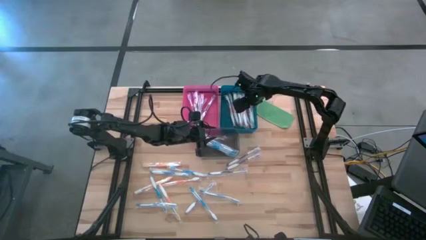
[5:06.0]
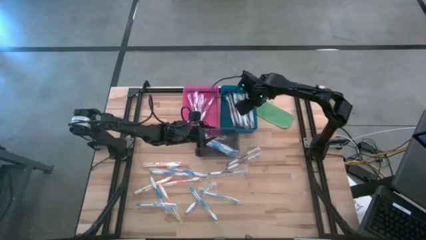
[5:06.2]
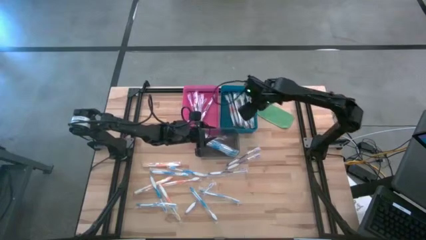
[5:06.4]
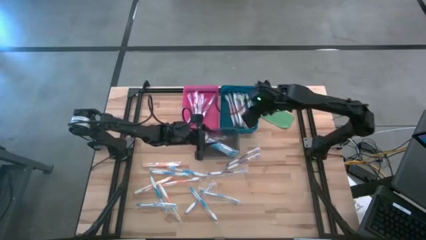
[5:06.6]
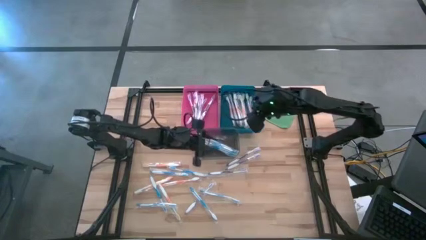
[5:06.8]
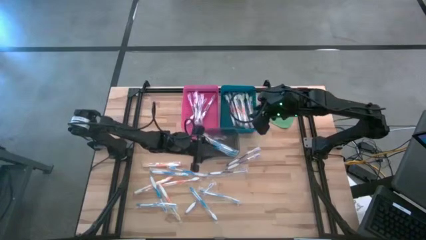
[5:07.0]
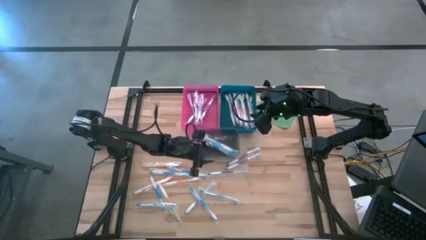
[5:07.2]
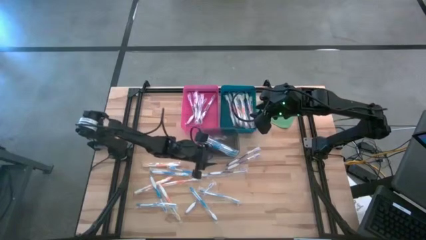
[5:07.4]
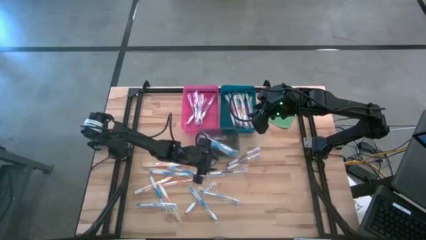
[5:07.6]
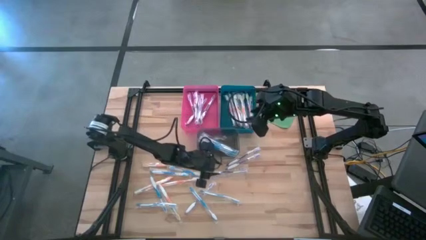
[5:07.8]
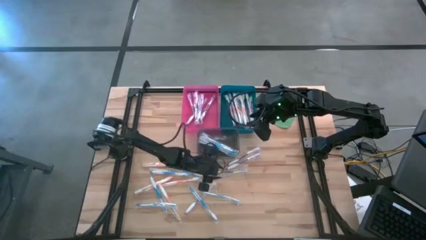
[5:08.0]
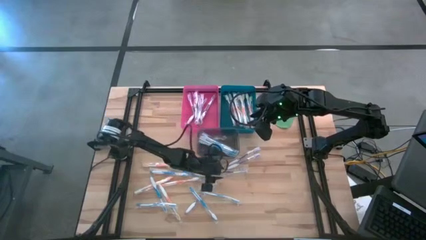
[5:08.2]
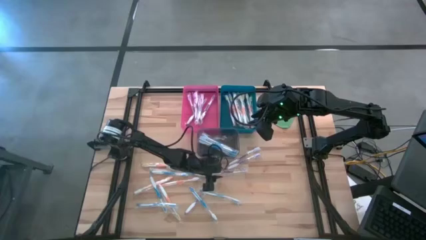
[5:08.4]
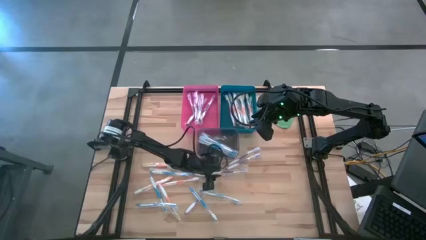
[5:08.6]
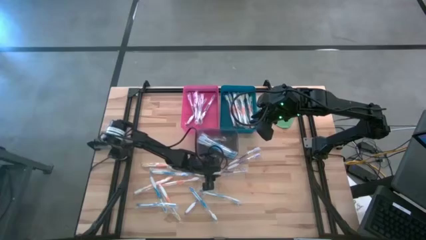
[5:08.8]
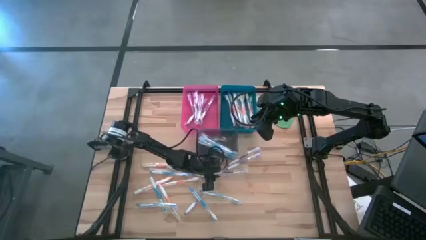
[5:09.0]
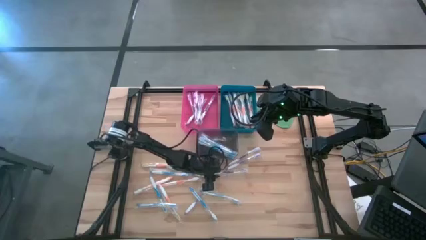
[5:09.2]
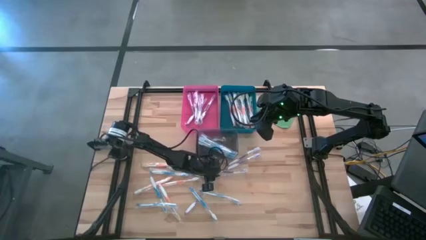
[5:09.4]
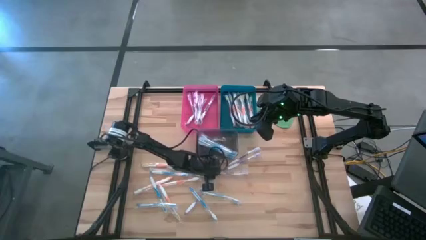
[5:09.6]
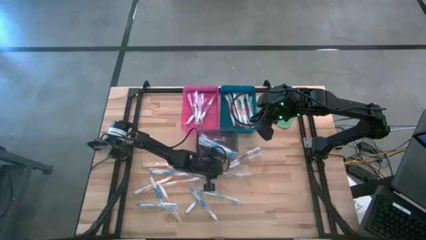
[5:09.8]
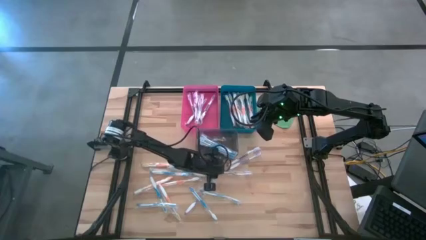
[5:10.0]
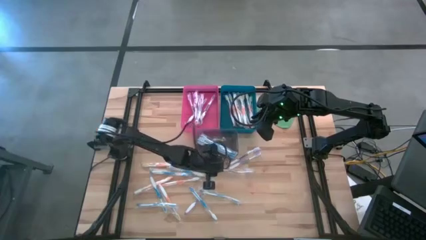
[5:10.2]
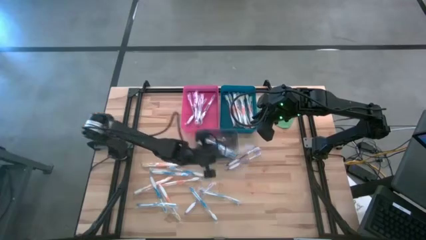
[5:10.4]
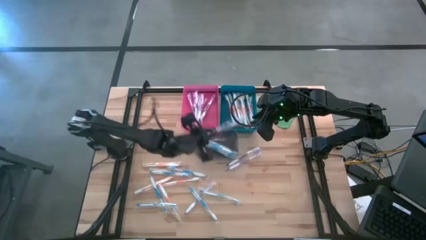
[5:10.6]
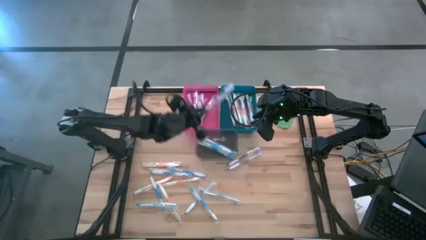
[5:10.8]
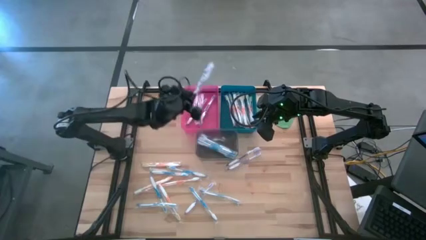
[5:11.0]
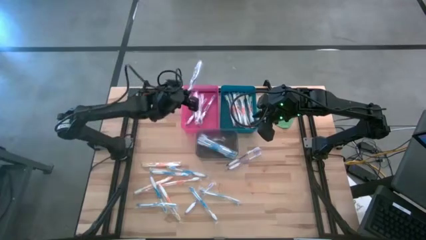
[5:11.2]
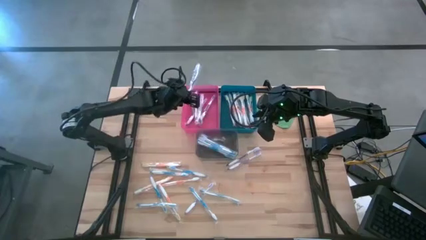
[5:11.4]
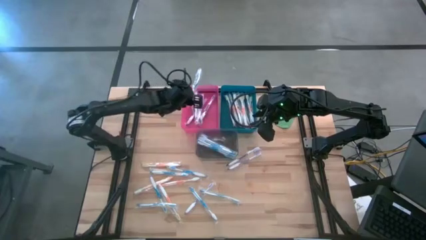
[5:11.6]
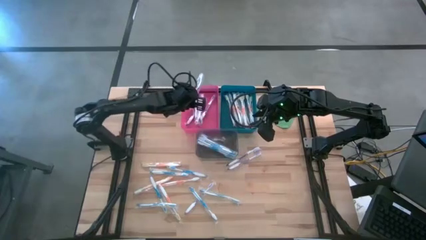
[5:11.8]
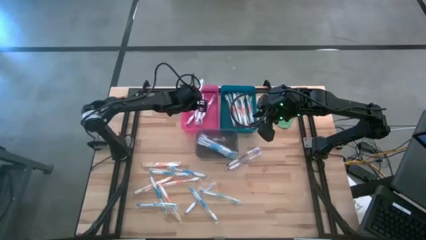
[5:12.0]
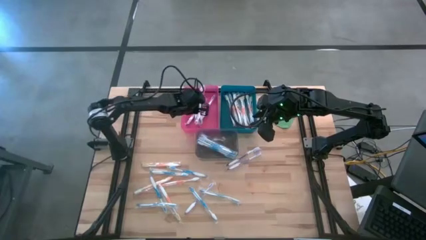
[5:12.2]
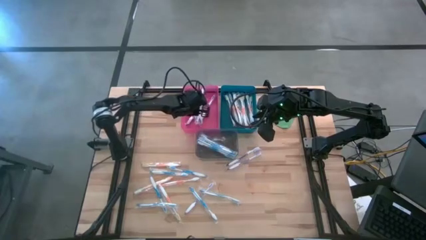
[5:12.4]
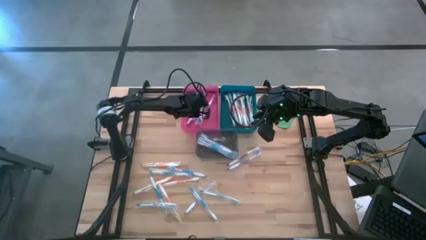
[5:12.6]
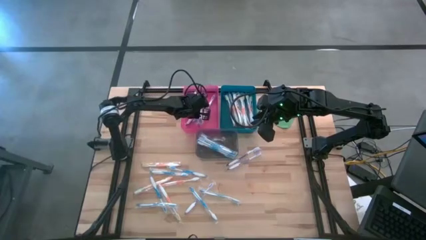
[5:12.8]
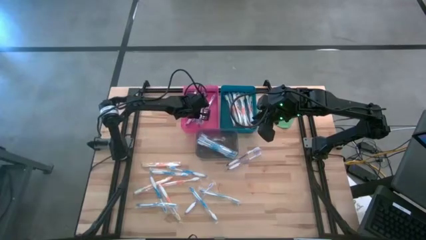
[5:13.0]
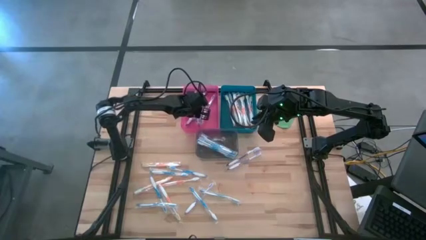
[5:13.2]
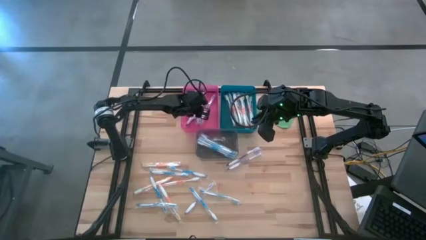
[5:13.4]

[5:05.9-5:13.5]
Task: Pick & Place Toothbrushes
Put the purple toothbrush into the pink bin

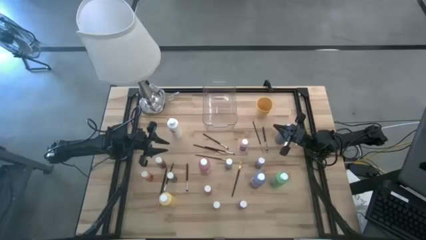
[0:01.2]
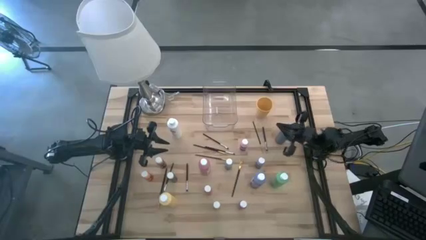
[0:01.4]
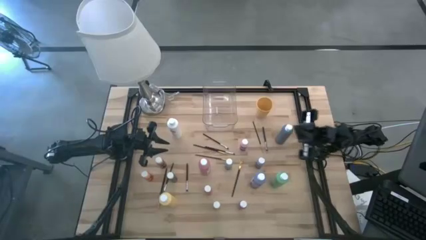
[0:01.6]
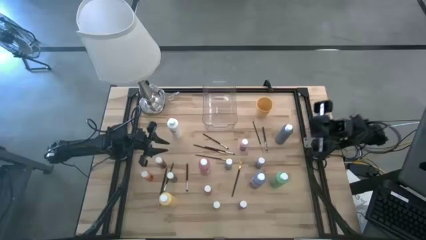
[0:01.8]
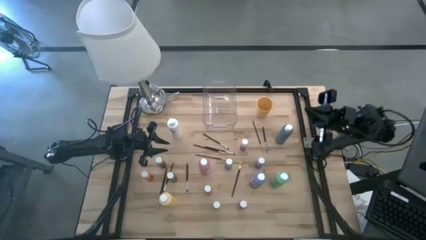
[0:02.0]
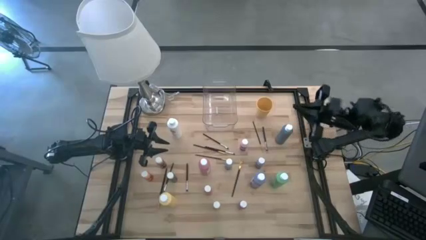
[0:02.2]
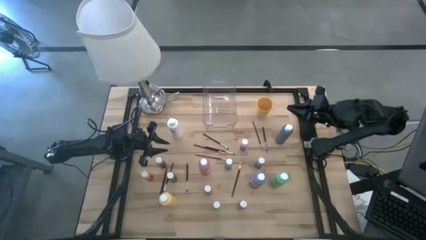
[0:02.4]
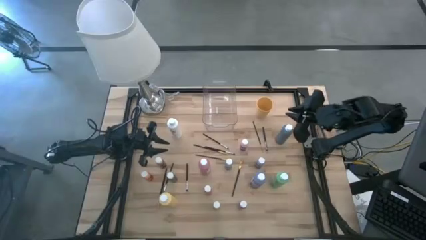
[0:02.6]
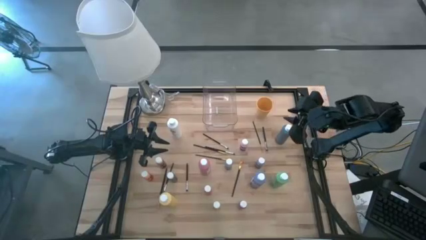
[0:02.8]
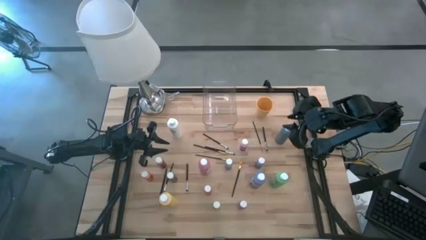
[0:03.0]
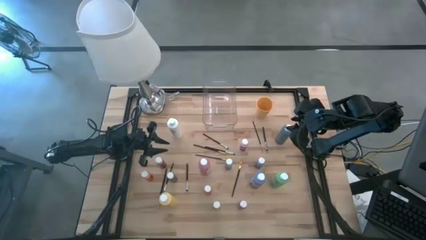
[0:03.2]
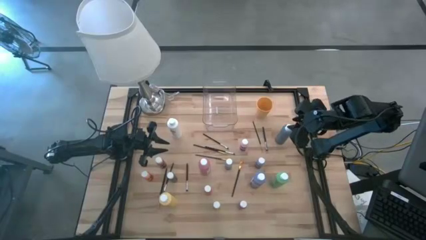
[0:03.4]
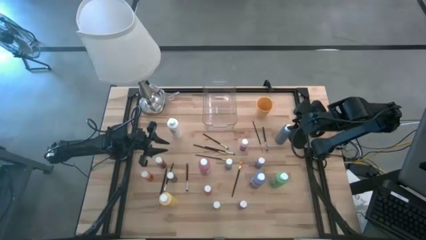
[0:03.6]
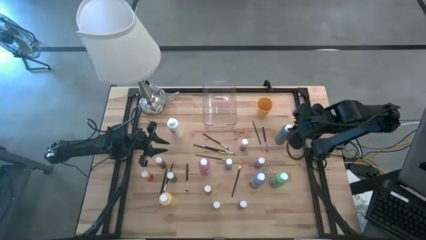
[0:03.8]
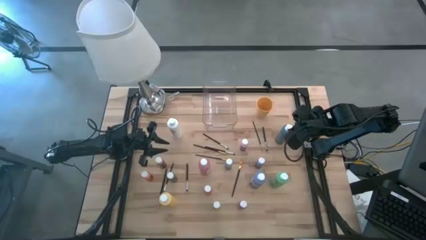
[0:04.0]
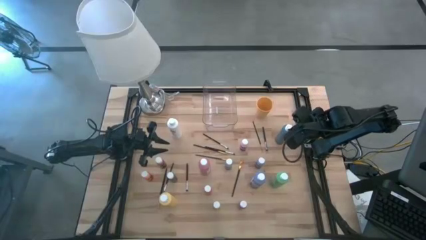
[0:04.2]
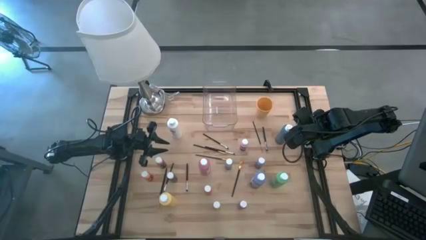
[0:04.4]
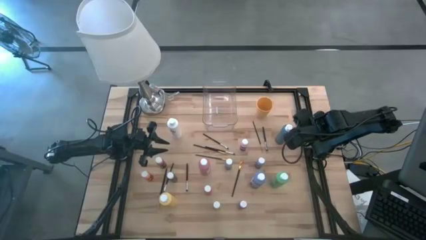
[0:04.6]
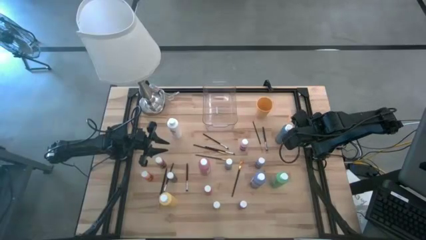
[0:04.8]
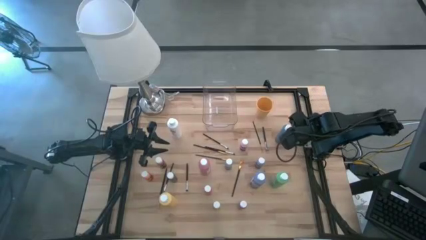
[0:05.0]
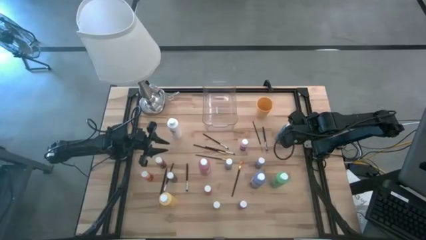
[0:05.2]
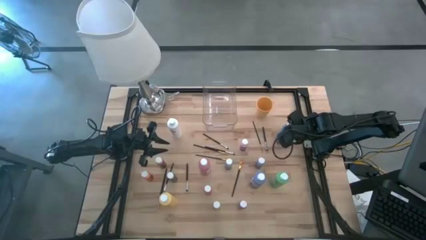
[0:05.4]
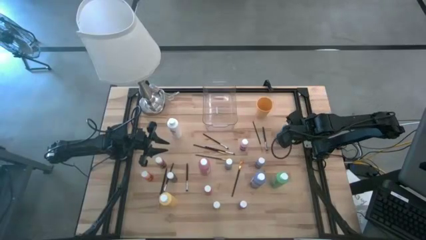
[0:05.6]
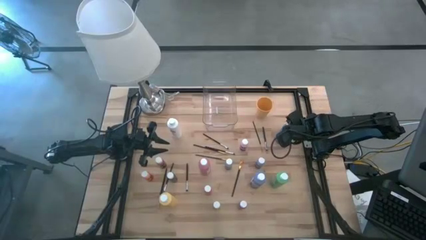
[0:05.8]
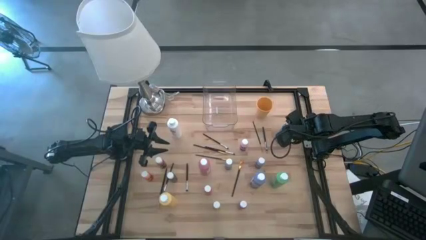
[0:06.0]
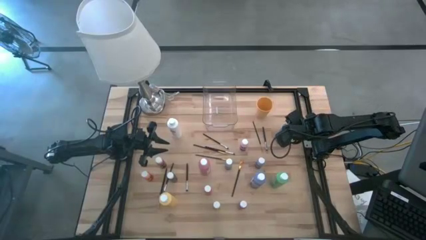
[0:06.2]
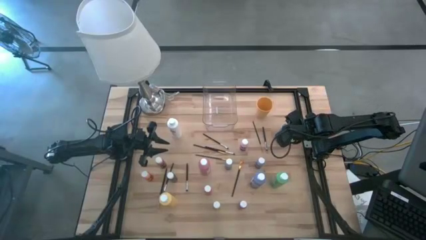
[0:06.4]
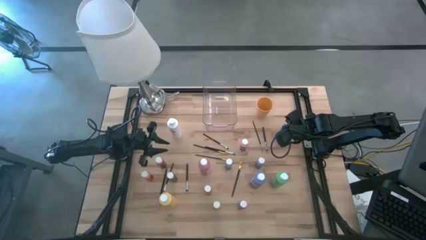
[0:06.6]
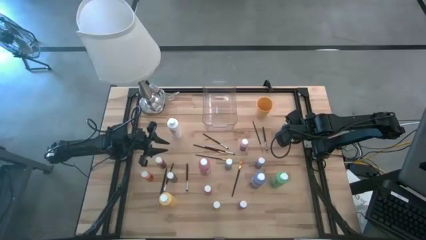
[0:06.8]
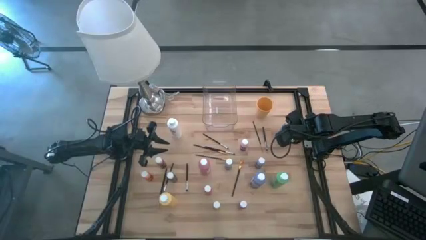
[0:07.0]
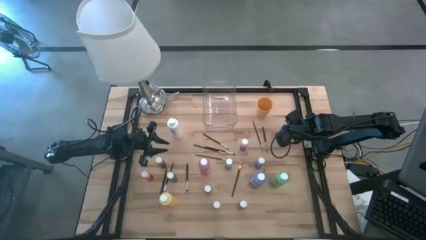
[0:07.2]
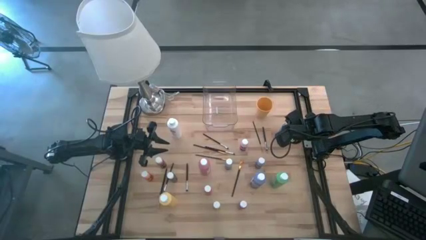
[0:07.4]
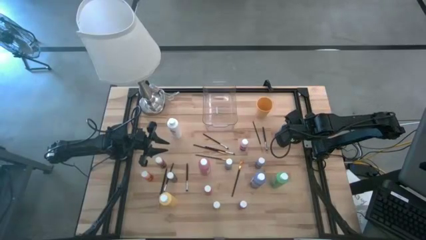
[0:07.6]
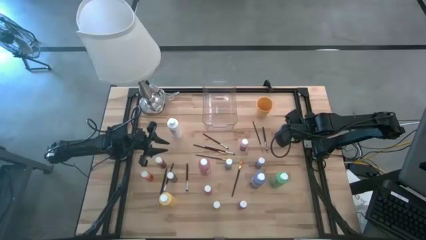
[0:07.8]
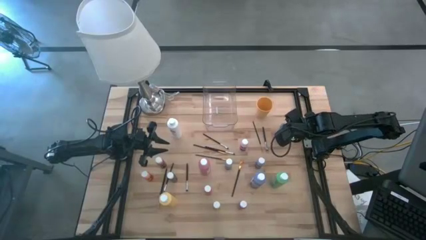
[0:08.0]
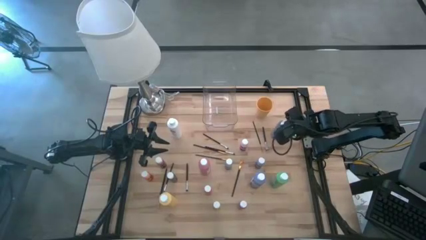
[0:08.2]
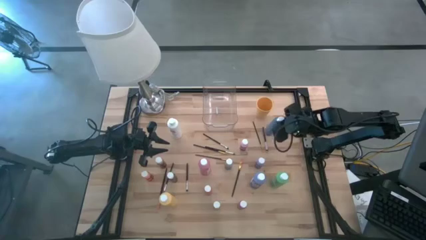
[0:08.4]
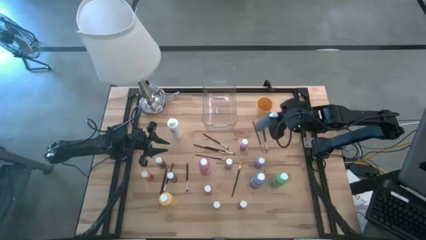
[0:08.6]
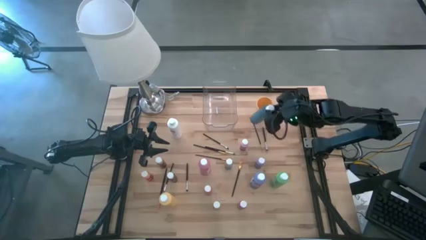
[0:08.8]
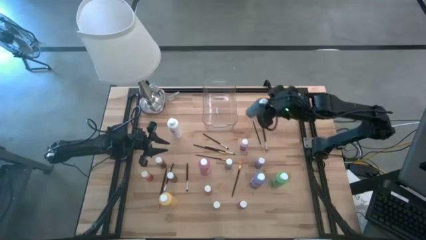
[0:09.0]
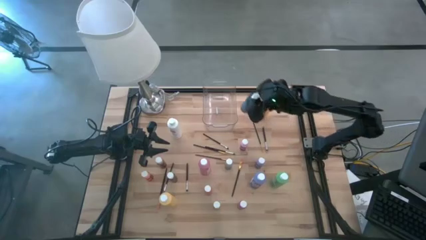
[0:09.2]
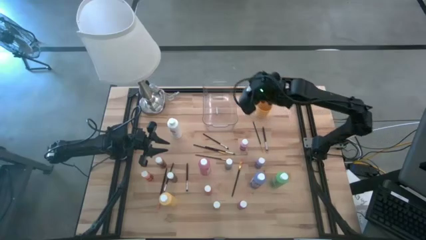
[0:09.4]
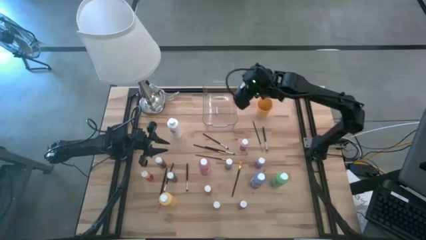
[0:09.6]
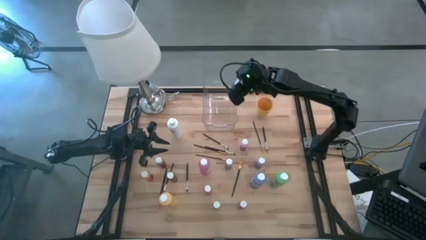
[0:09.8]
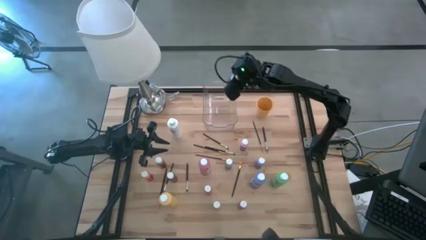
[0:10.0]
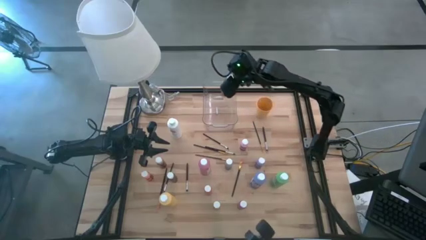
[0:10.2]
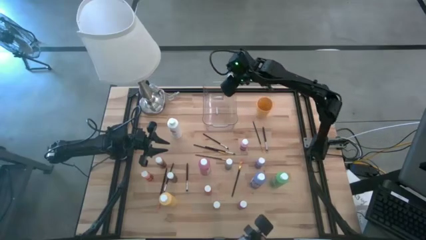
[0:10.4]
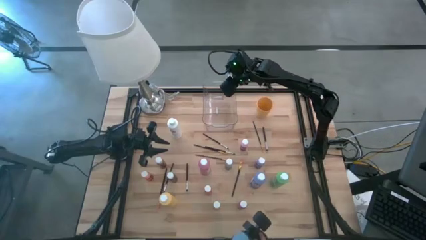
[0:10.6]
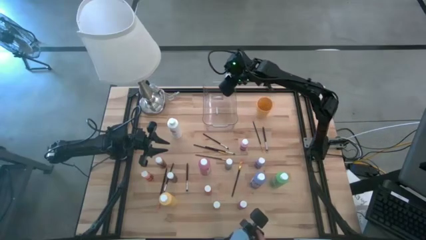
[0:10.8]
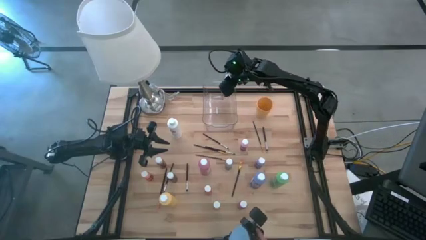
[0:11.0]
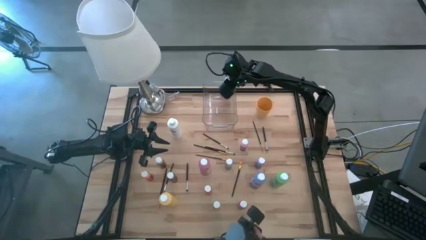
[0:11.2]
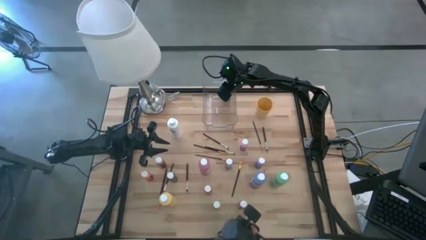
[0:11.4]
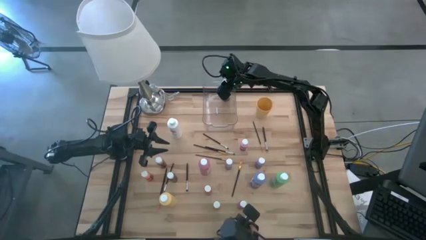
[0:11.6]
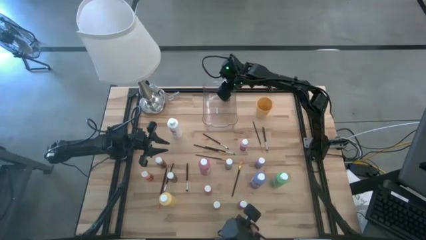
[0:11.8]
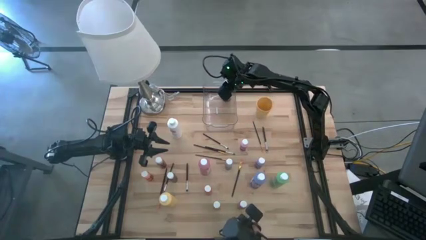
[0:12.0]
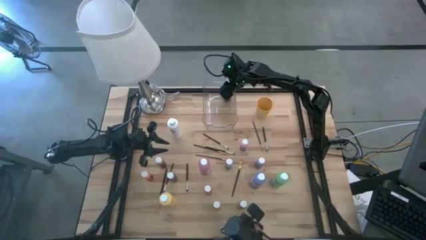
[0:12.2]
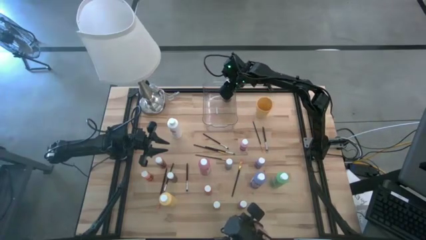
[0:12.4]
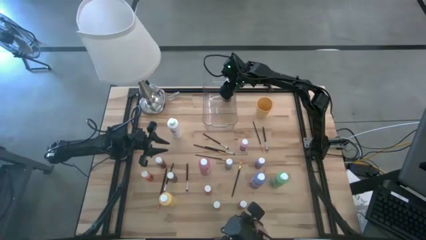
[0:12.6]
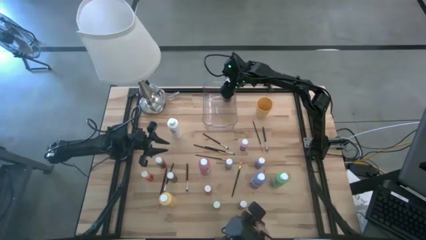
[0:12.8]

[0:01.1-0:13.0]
Task: Pick & Place Paint Supplies
Put the big blue paint bottle into the bin
